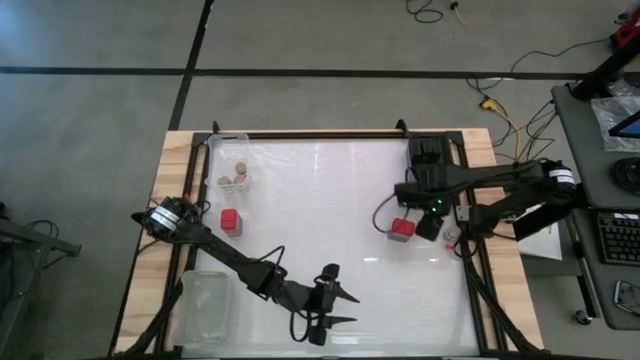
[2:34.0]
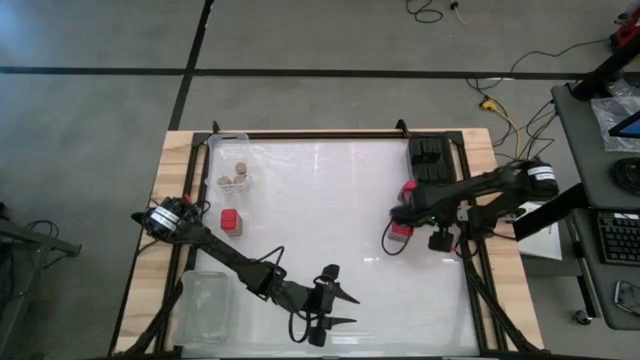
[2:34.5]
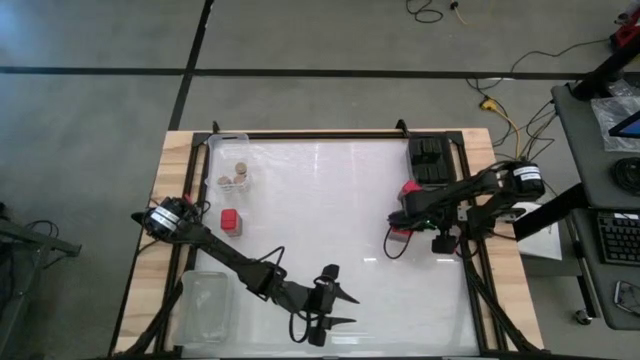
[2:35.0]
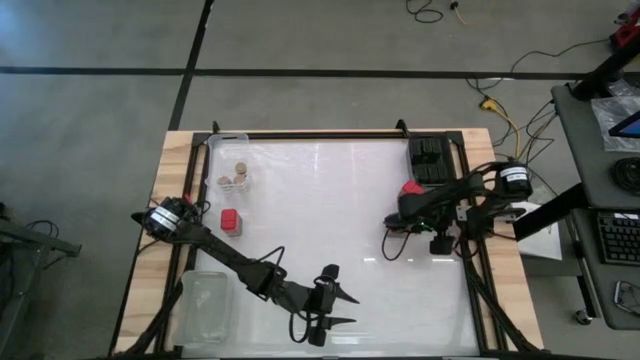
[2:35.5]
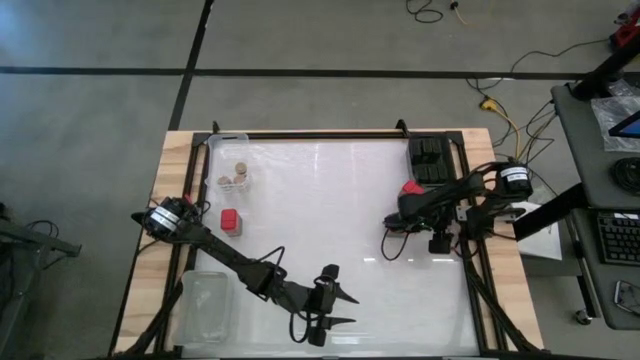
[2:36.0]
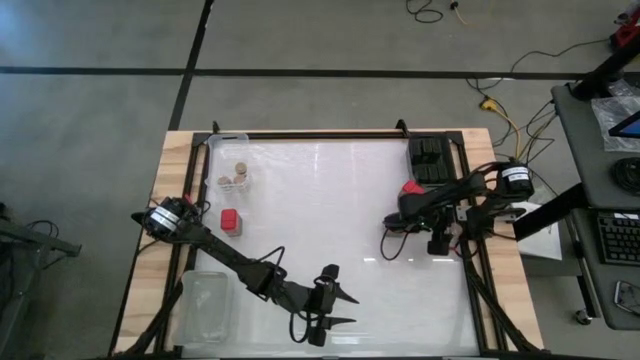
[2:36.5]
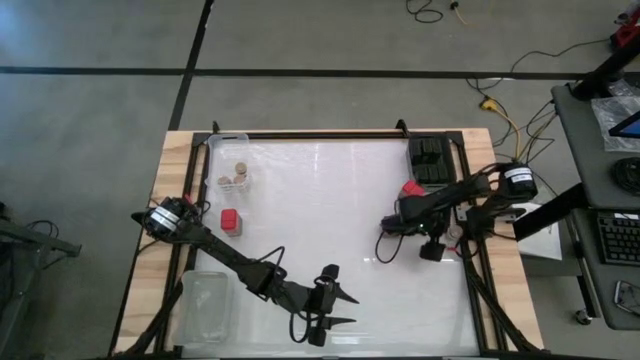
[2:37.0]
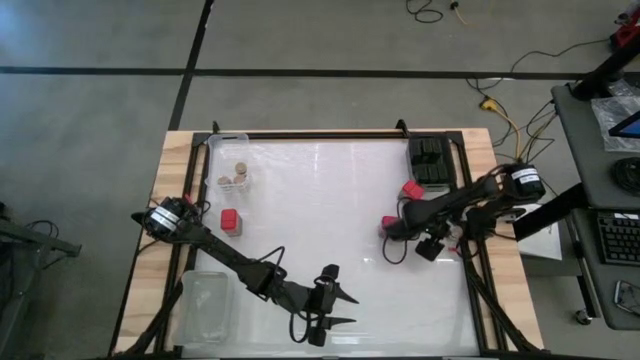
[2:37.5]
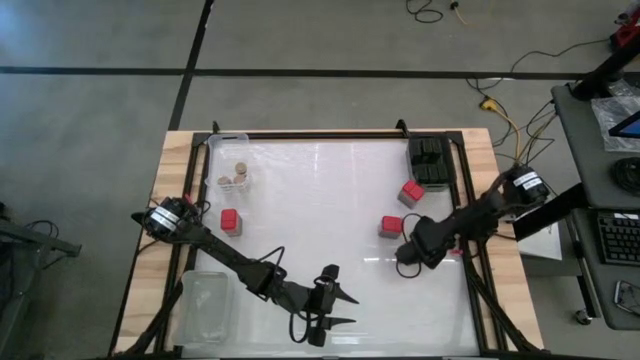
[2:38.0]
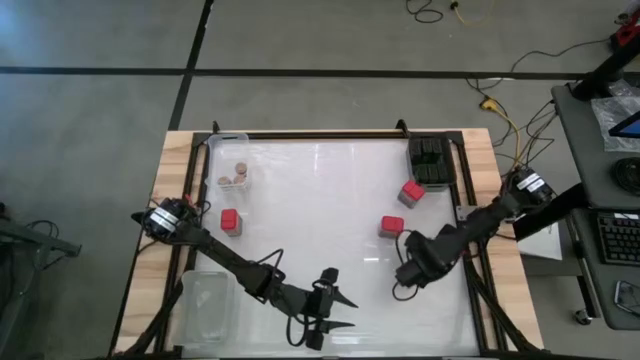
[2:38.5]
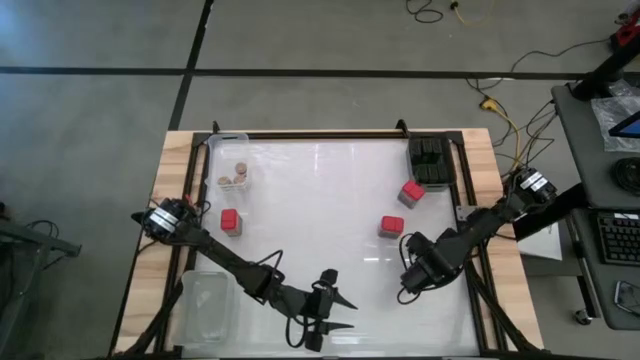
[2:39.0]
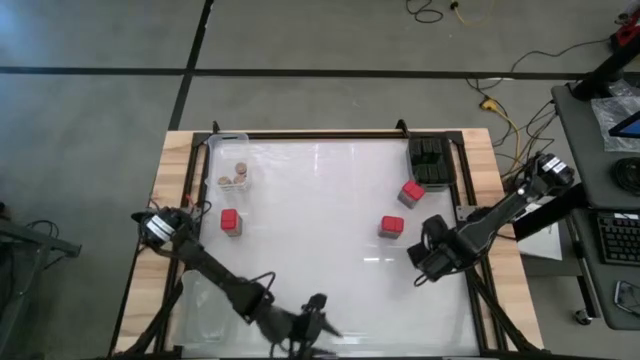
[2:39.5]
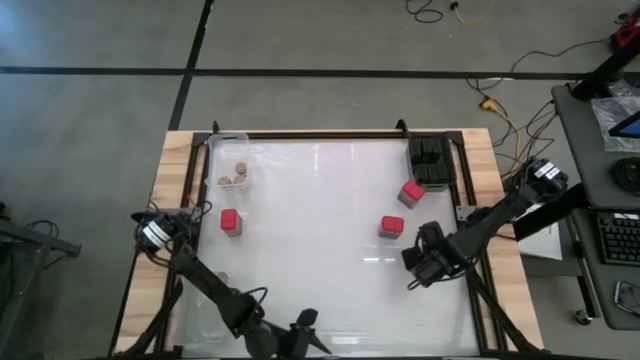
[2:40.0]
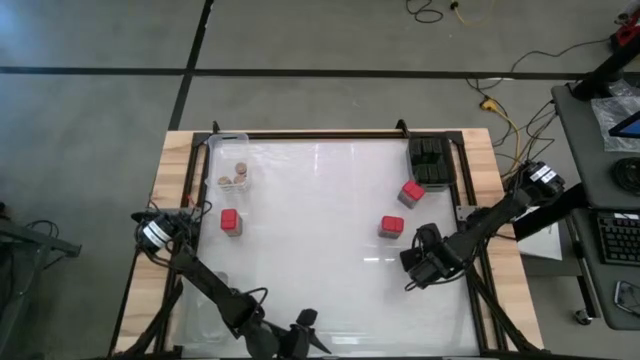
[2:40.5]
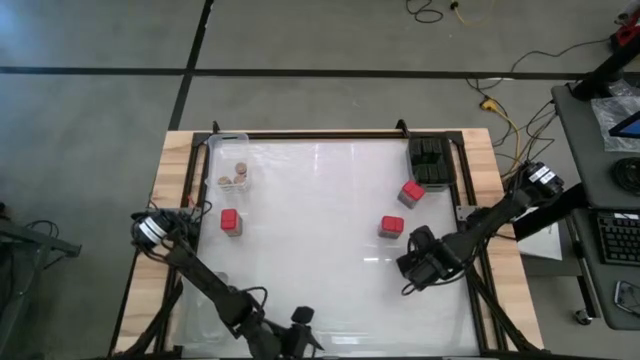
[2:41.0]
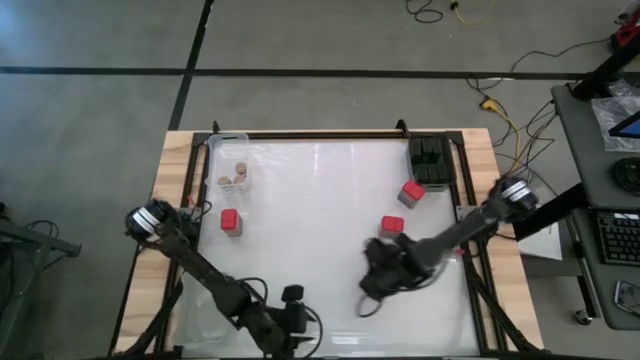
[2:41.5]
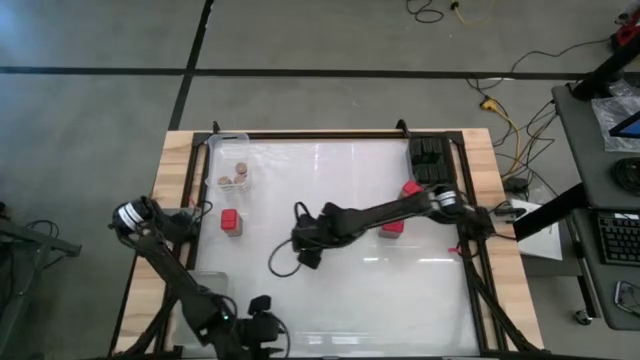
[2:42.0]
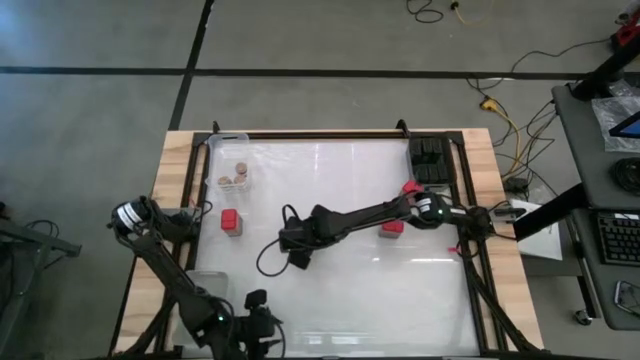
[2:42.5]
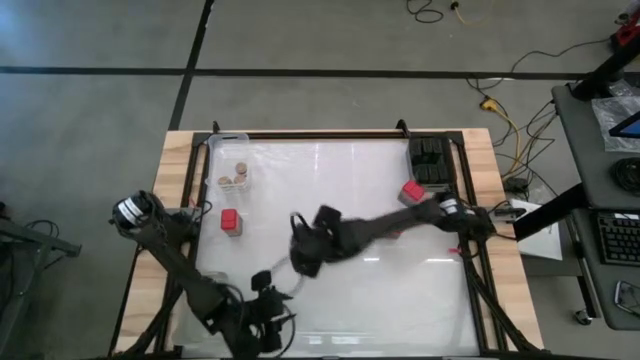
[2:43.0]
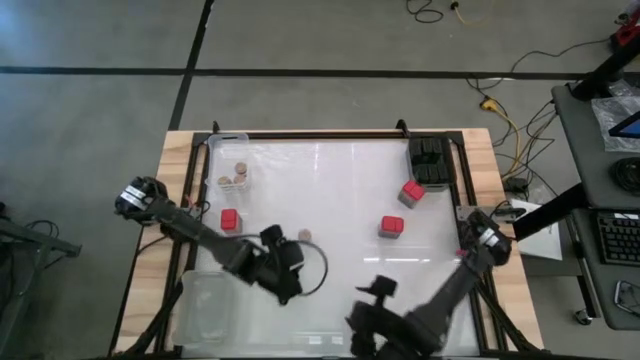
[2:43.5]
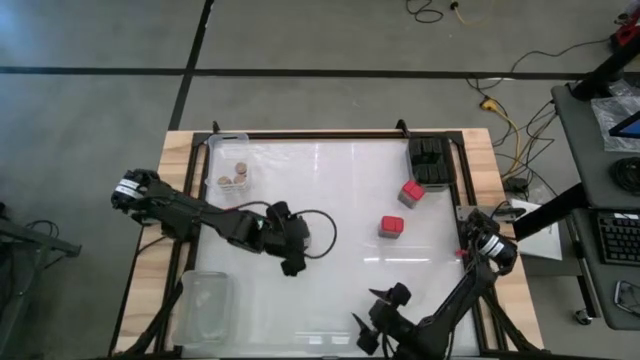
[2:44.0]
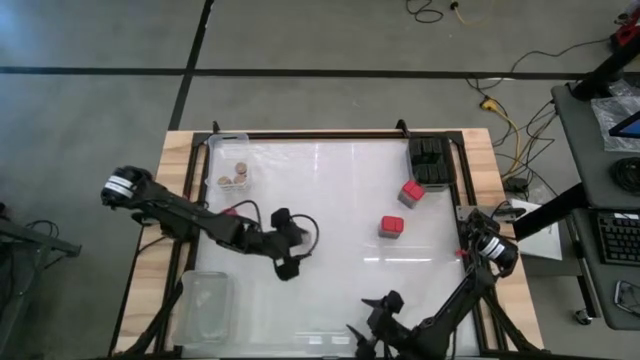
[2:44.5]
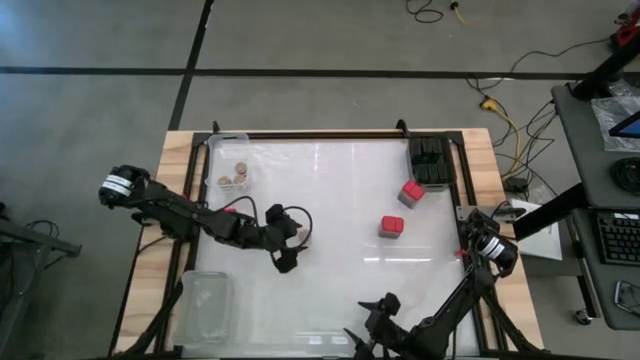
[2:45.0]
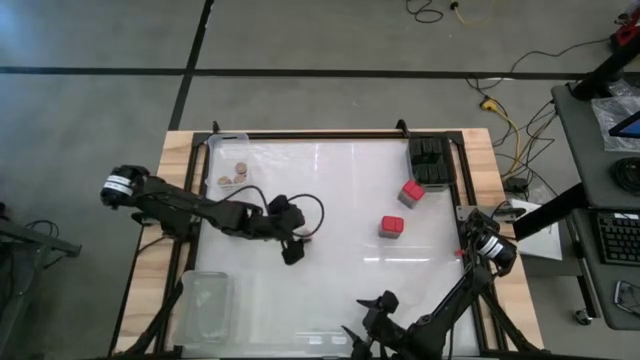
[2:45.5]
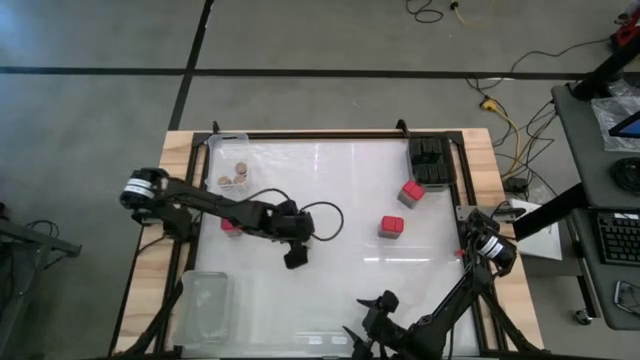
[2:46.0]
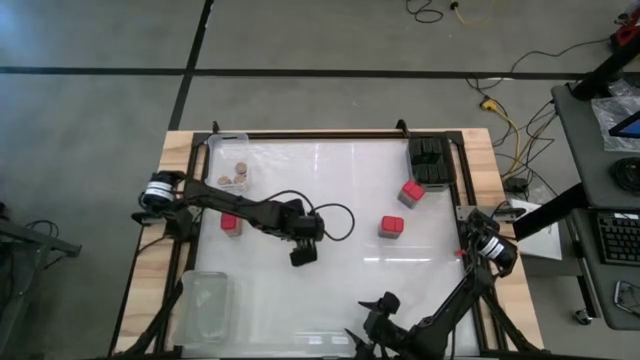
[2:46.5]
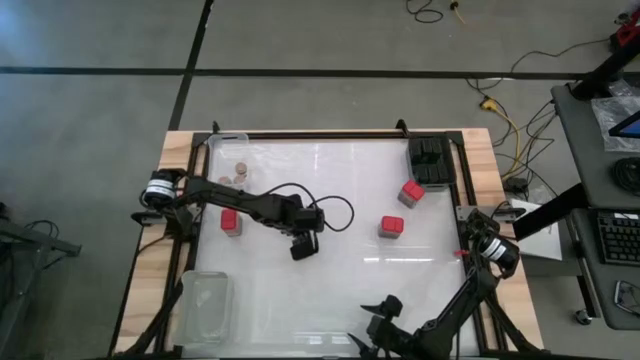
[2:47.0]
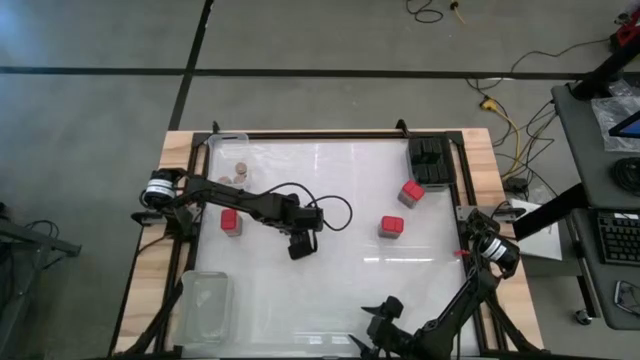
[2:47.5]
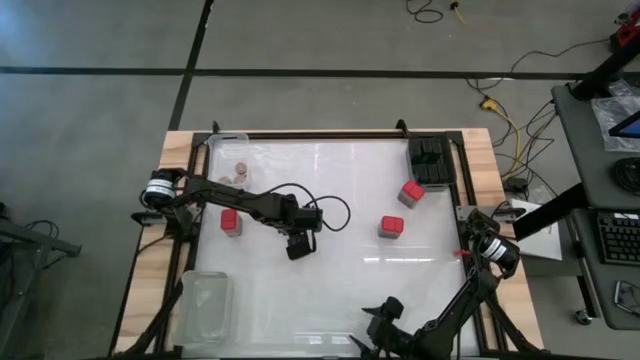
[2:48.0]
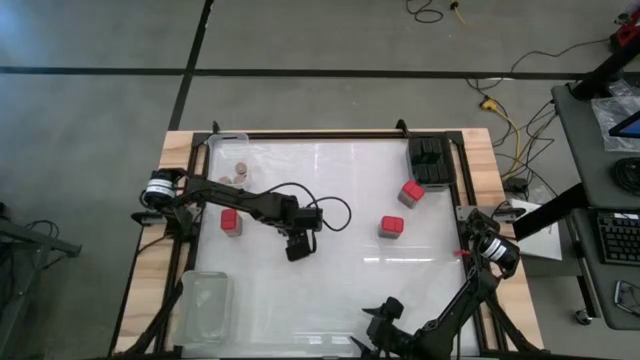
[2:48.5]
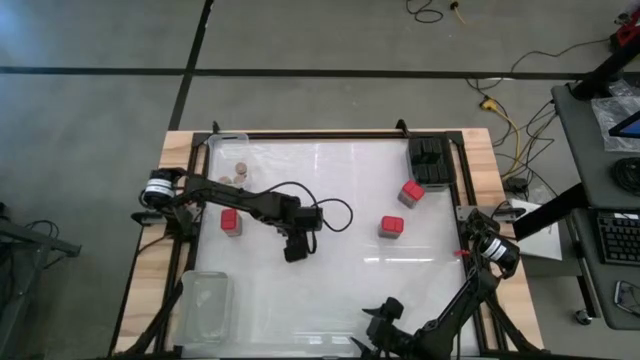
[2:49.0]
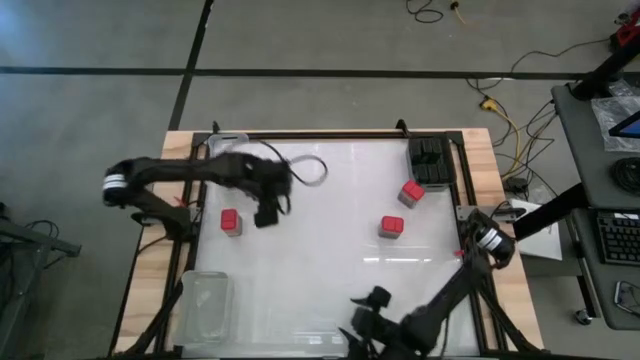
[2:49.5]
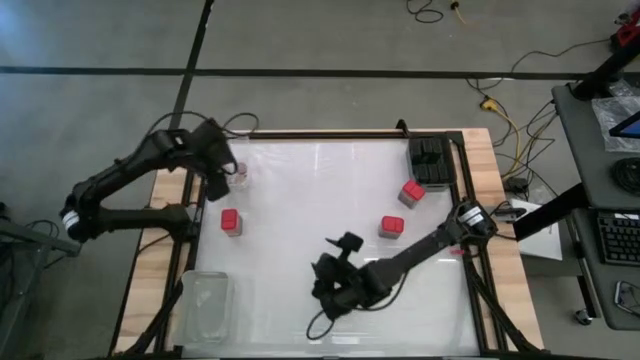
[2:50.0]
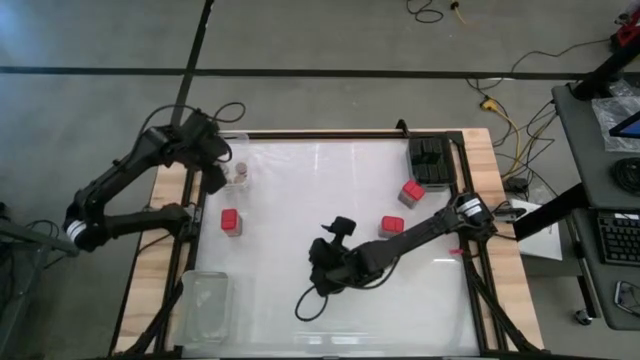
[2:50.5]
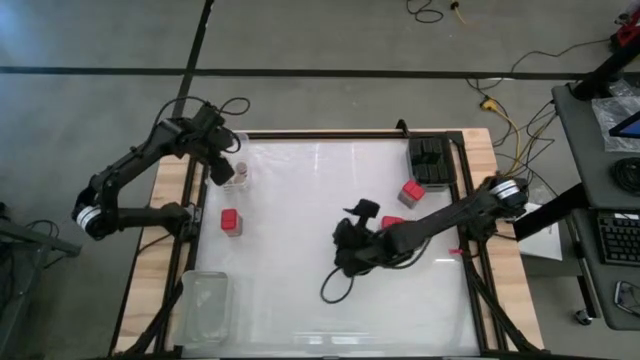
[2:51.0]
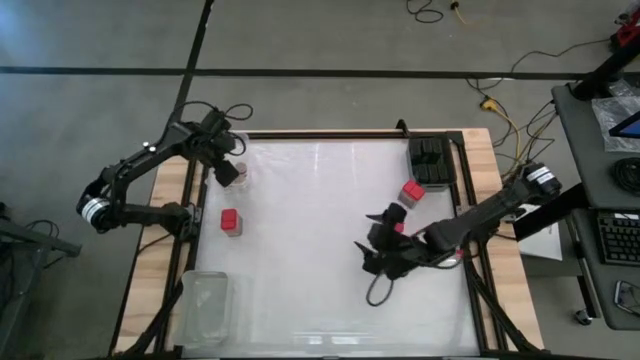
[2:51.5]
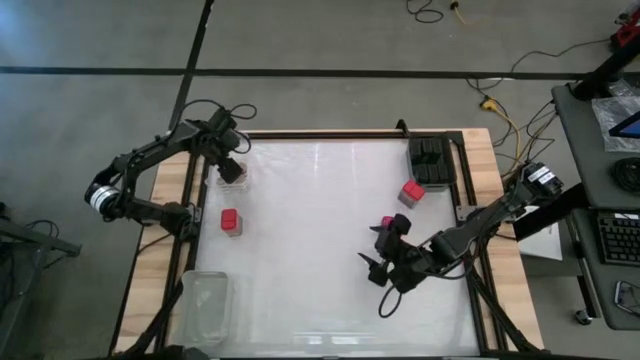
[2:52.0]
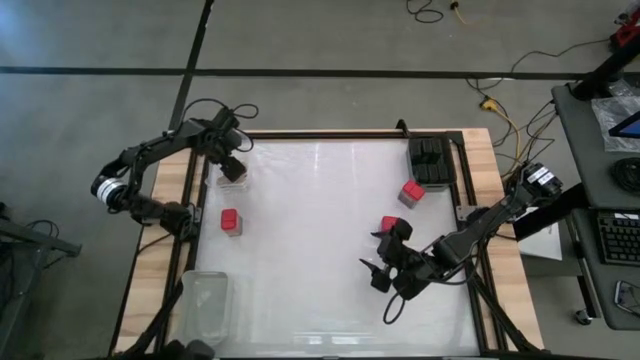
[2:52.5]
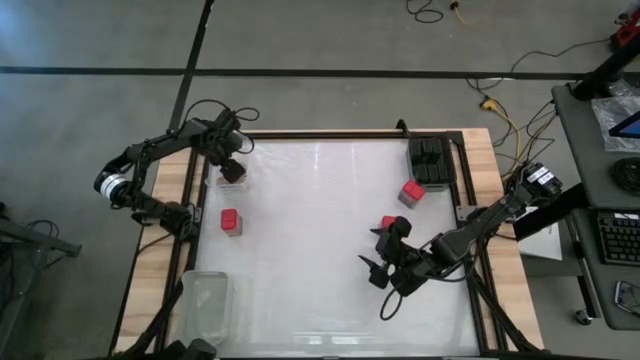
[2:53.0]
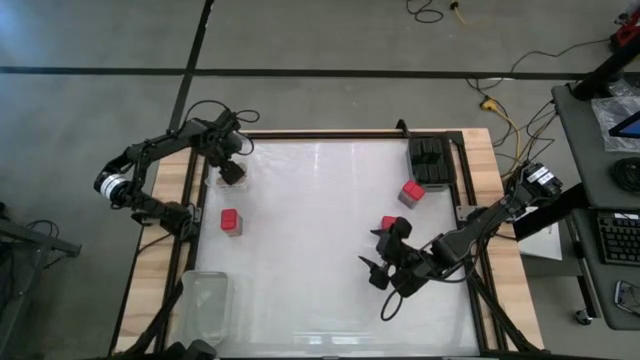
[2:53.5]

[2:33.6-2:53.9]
Task: Sort spices by type
Put the brown seasoning bottle into the transparent bin

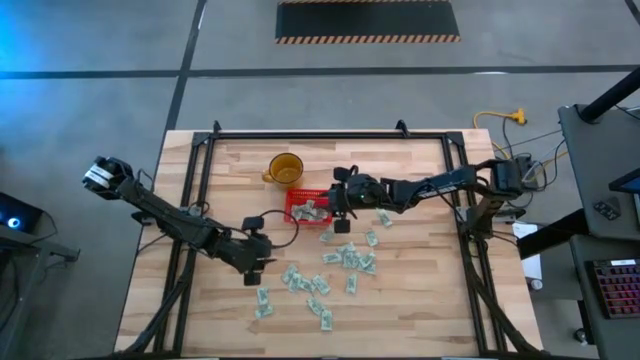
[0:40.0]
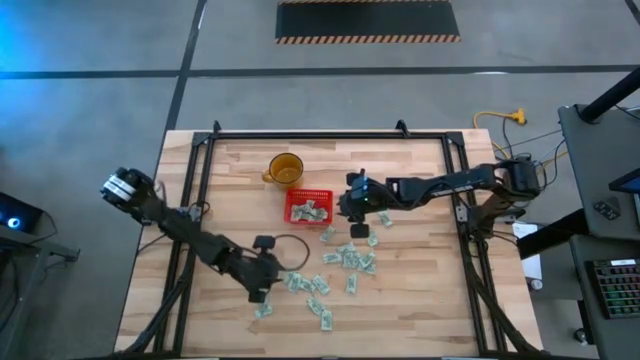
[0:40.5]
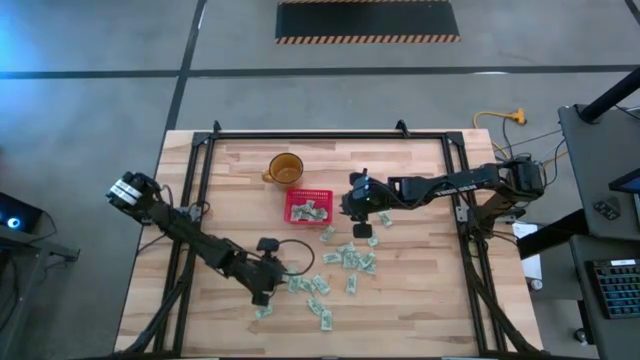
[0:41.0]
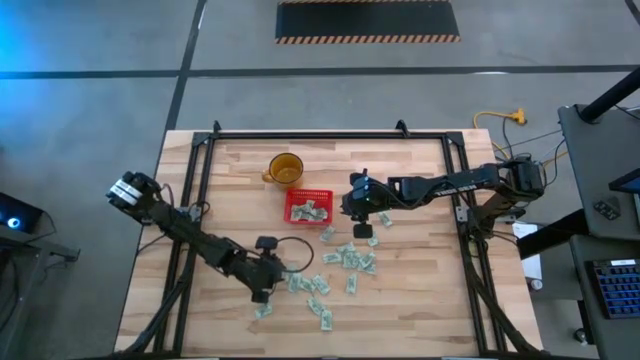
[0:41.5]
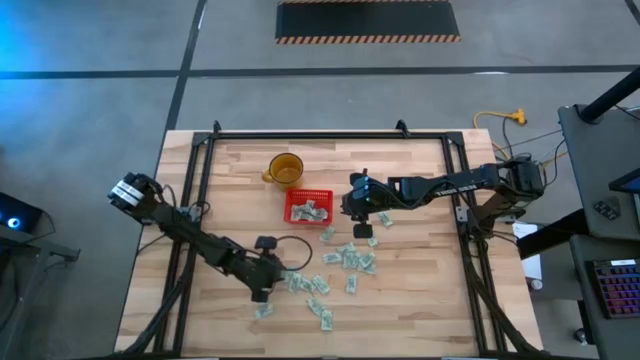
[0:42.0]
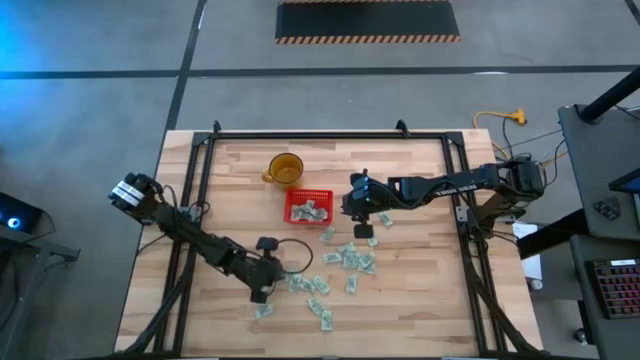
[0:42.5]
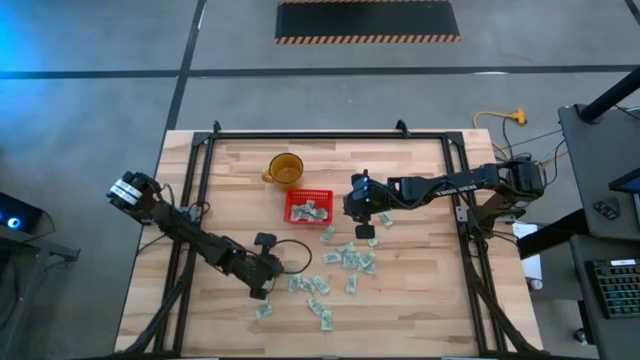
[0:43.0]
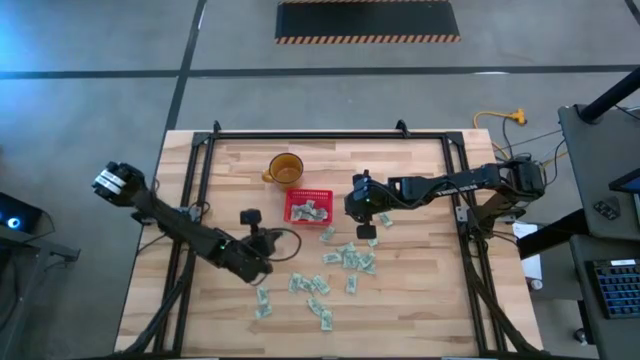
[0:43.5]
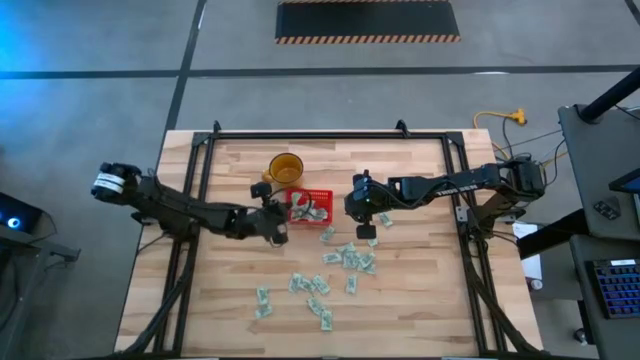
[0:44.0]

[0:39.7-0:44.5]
Task: Pick and place Stevia / Truvia into bins
Put the gray stevia packet into the red basket
